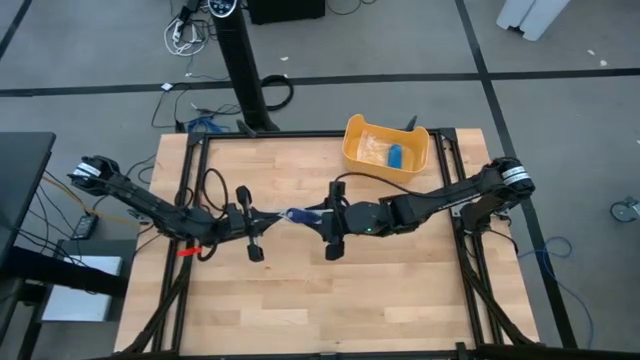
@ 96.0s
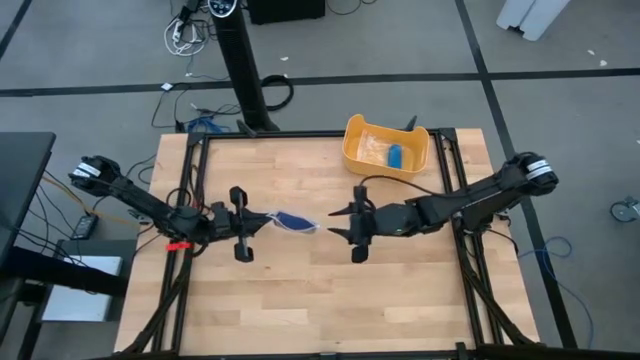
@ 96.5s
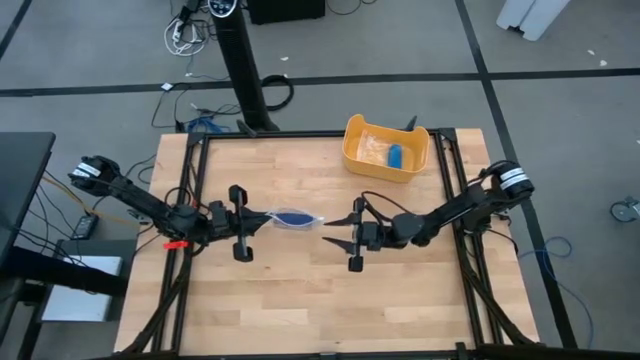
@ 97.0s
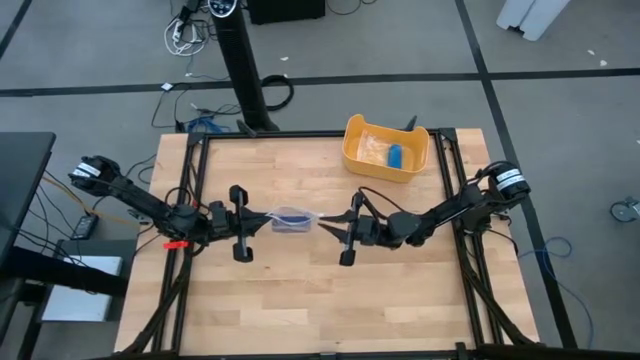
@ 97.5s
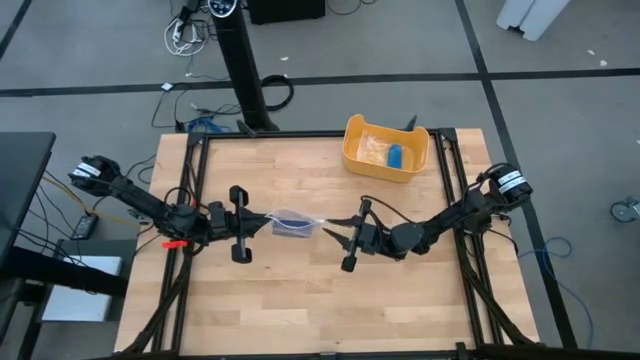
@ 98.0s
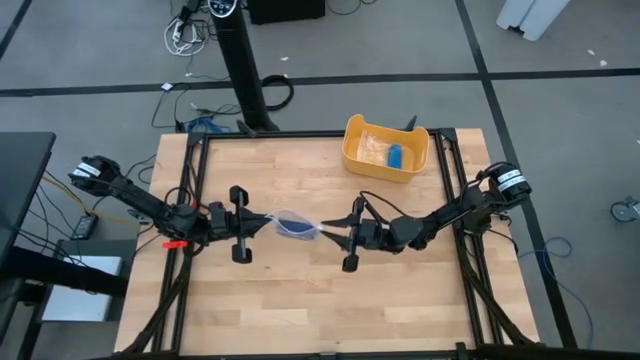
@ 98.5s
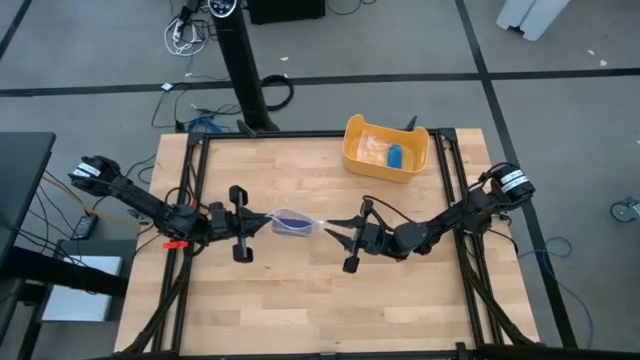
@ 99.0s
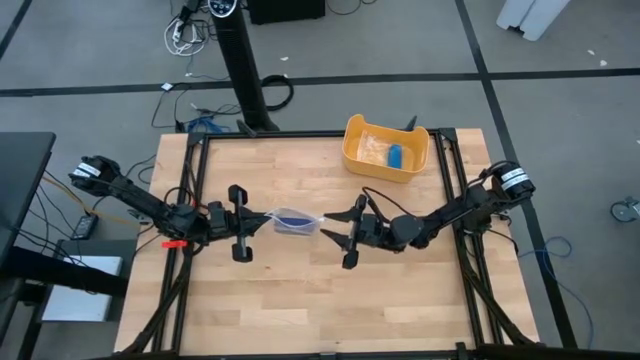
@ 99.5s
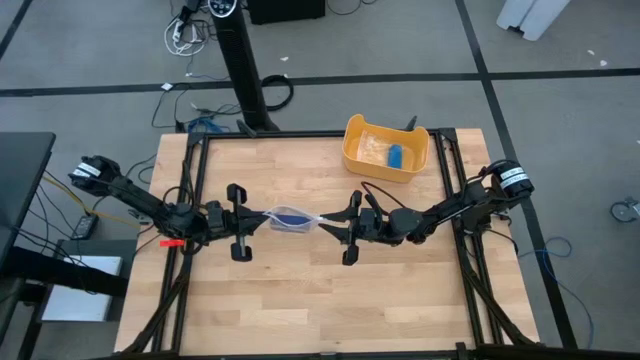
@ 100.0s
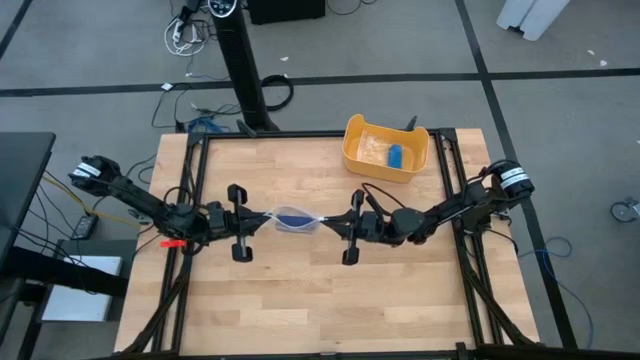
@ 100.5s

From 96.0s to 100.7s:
Task: Roll bandage
Close the transparent zip bag

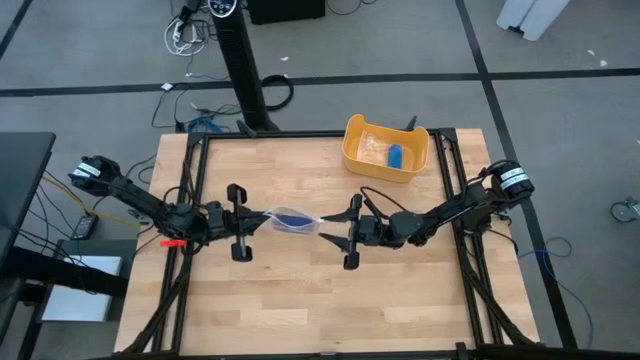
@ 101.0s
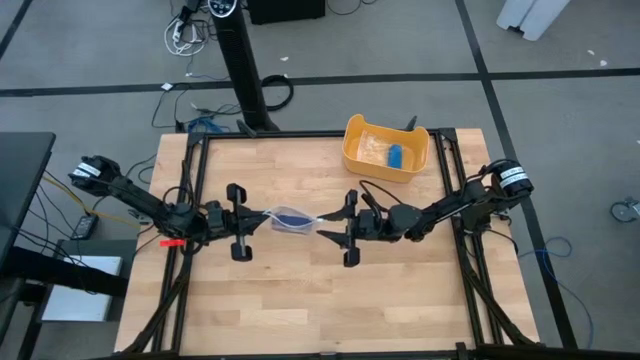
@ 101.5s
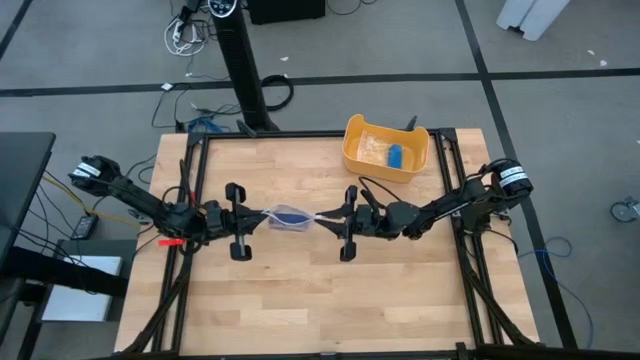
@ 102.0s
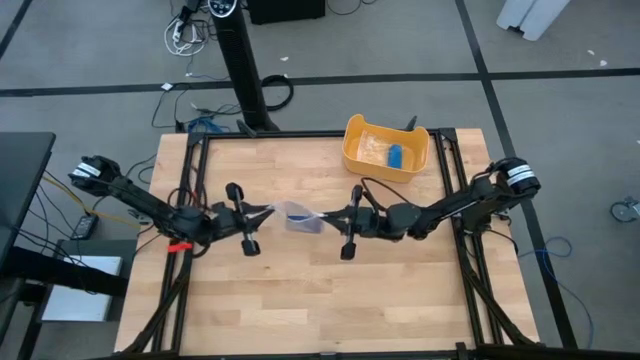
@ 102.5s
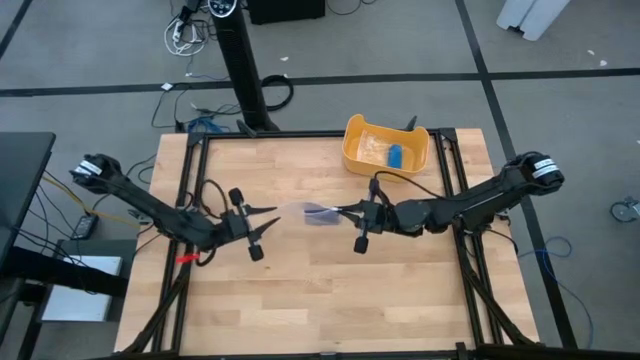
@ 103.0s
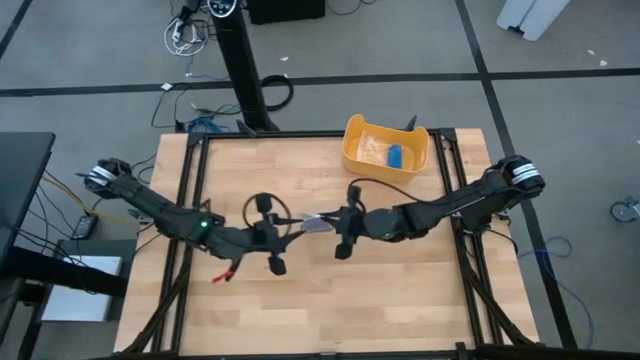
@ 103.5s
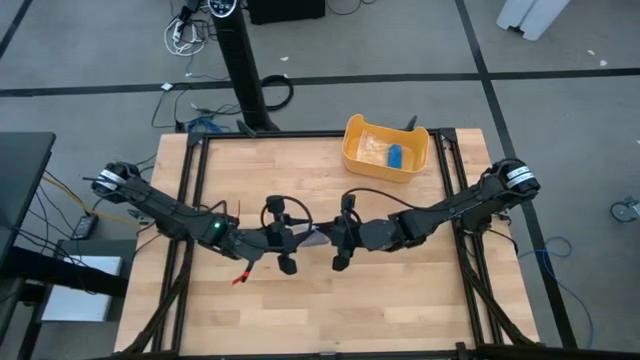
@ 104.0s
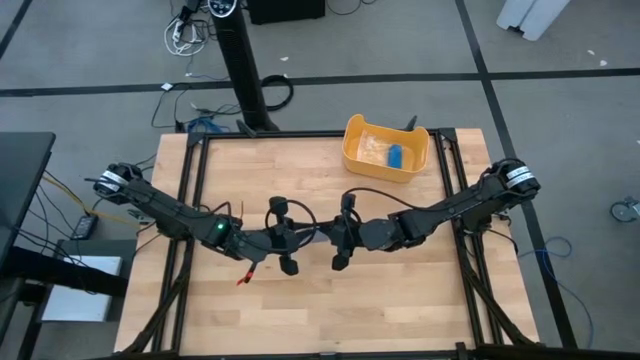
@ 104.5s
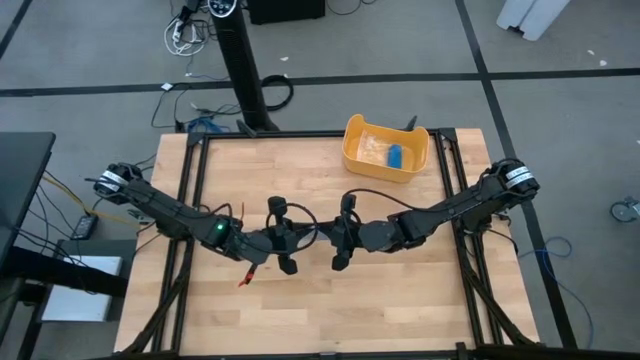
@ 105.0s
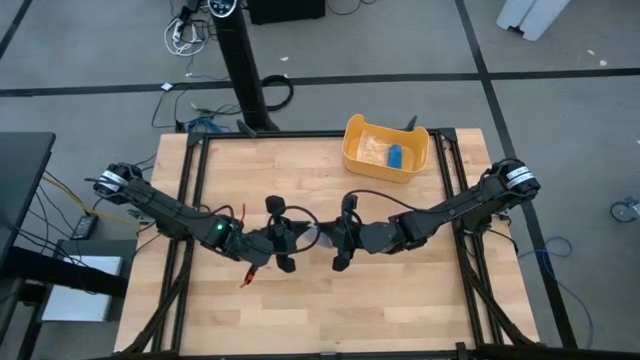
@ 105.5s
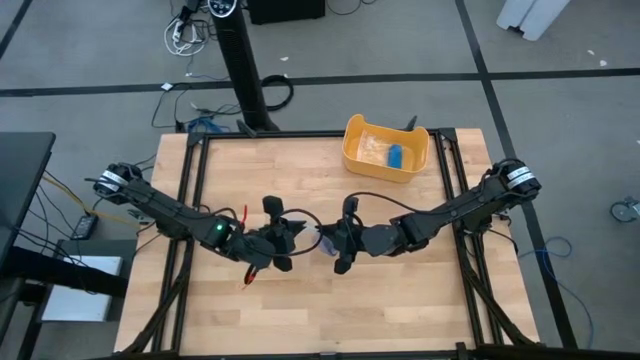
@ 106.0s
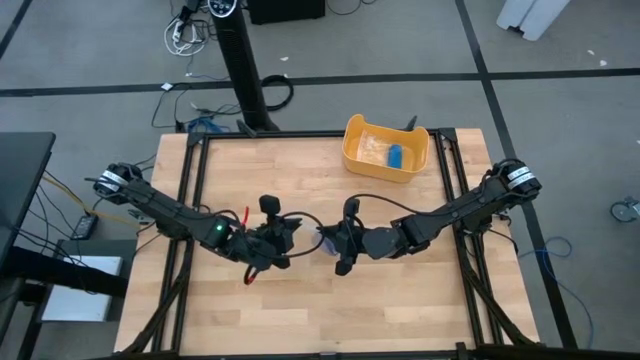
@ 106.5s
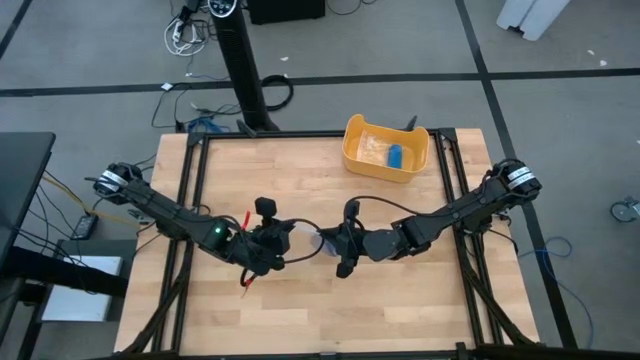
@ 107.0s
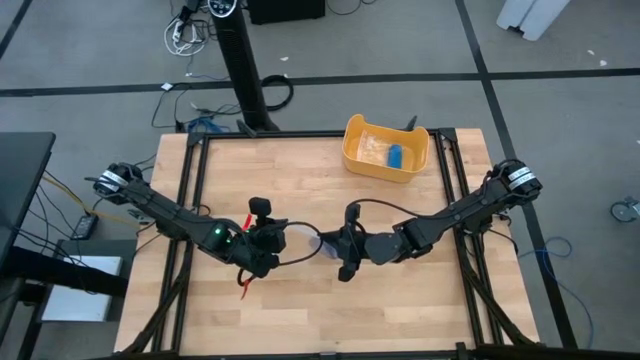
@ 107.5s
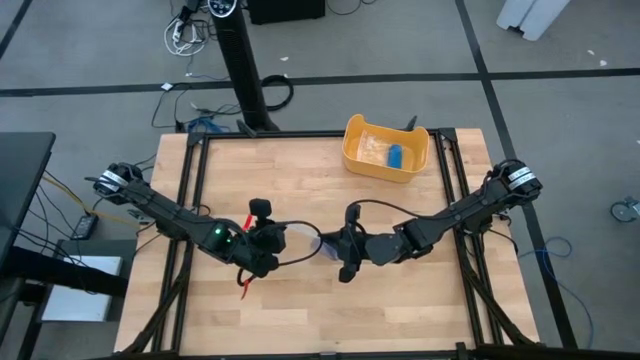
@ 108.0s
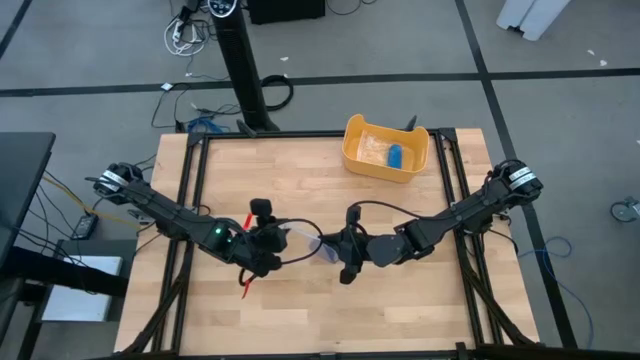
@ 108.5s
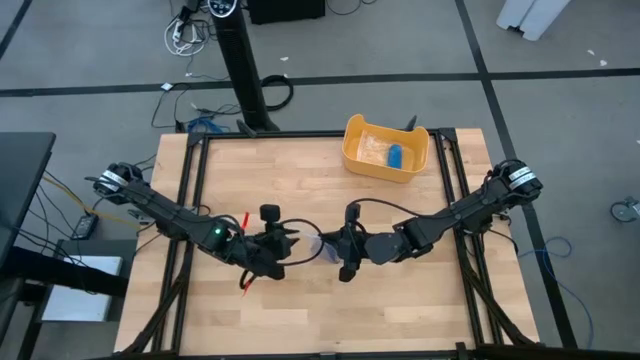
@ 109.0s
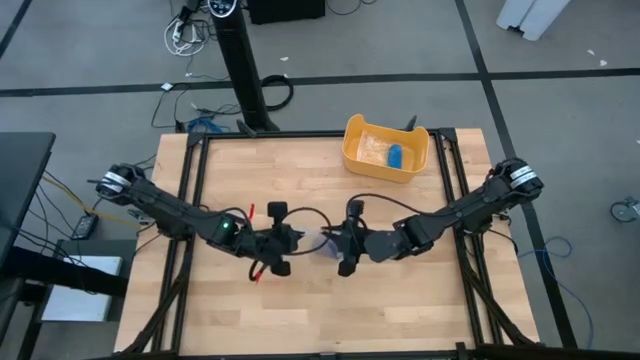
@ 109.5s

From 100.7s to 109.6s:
Close the transparent zip bag

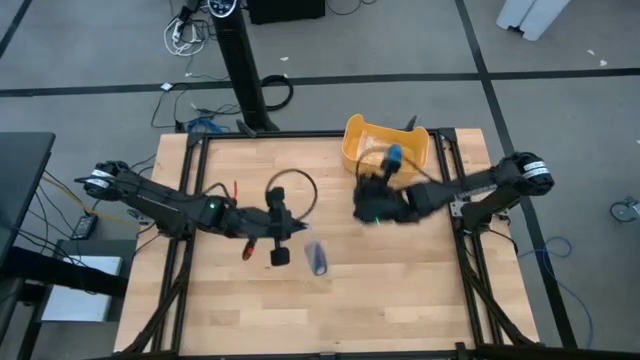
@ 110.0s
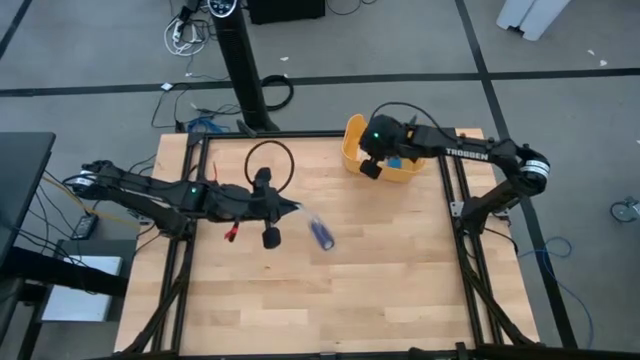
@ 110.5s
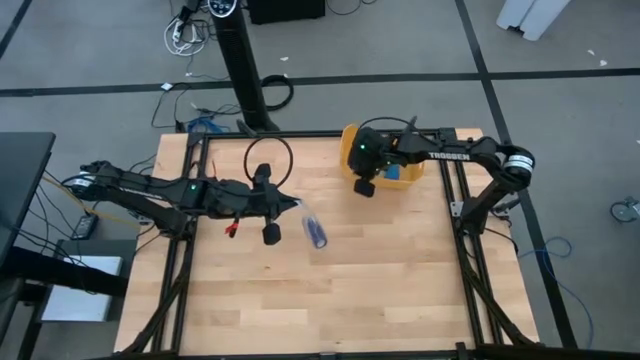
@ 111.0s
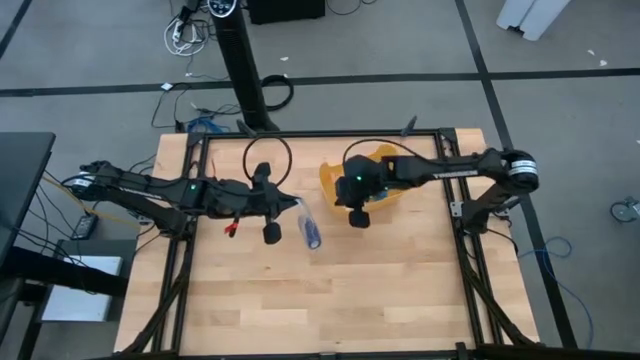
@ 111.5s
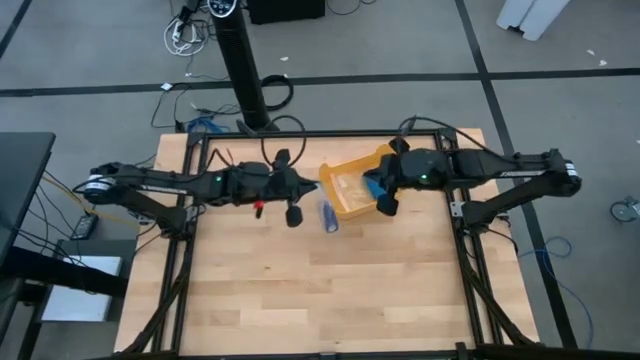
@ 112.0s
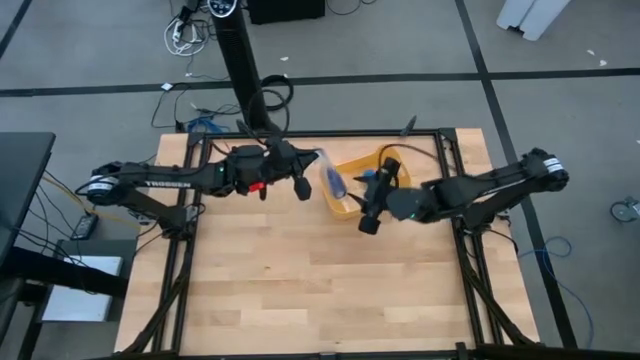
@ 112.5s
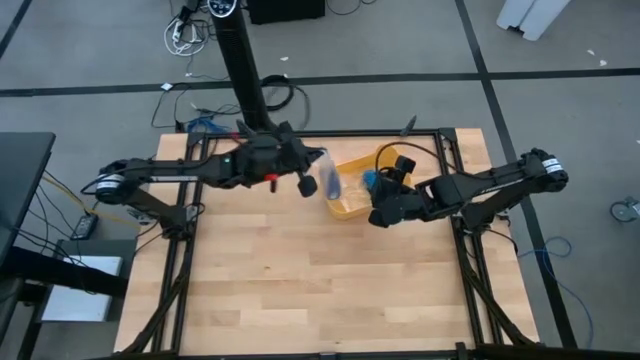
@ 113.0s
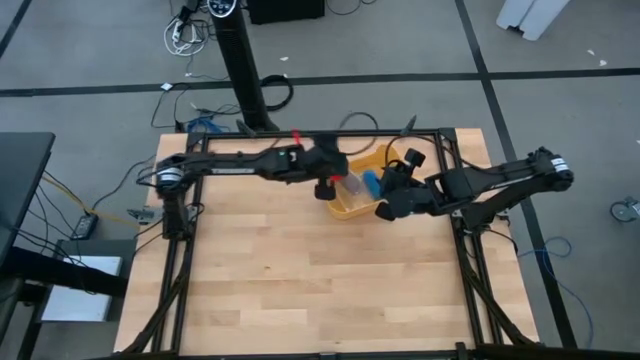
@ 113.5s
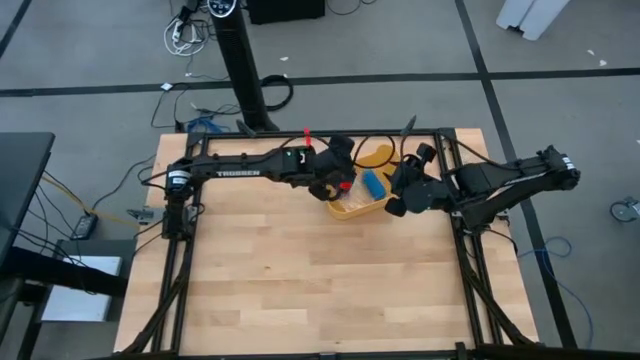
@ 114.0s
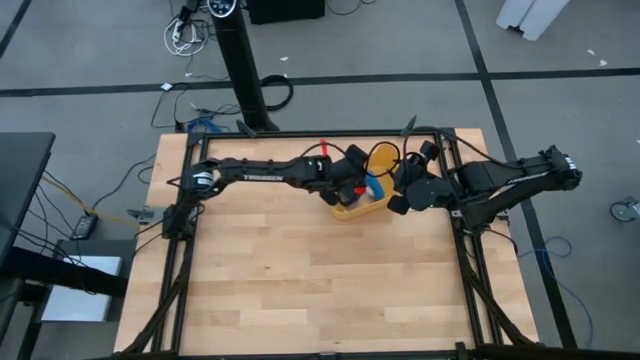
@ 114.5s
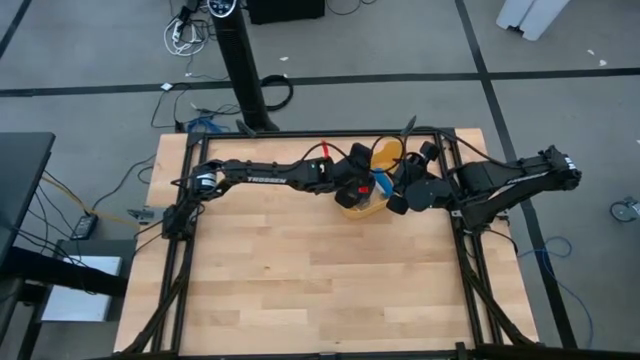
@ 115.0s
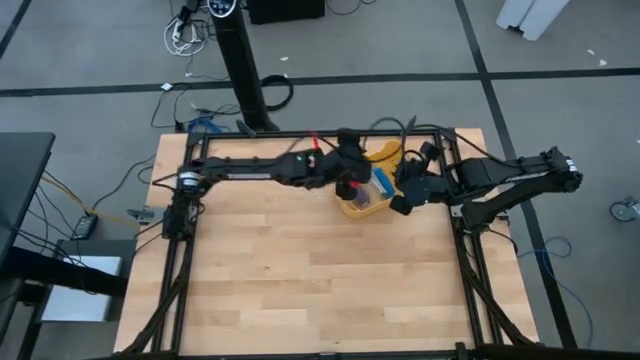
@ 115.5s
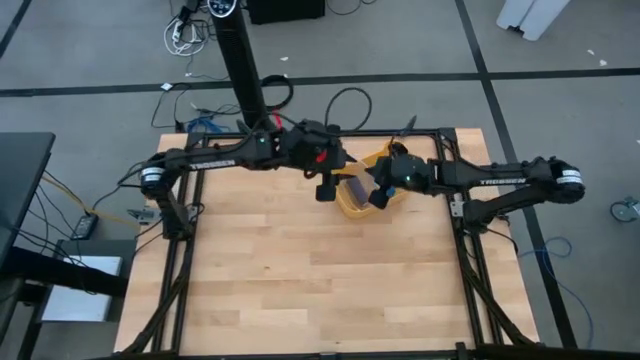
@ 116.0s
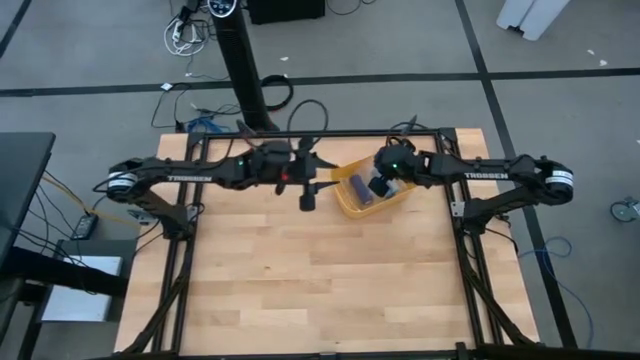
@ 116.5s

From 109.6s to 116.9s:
Put the transparent zip bag into the yellow bin

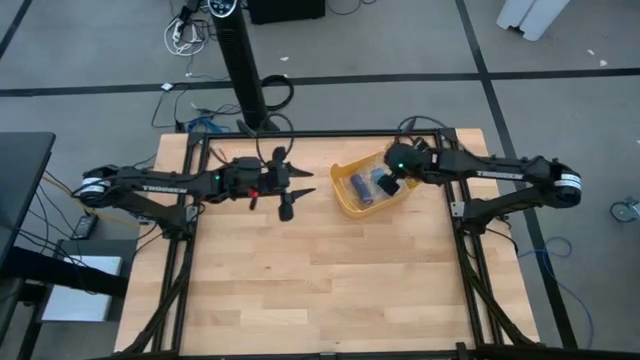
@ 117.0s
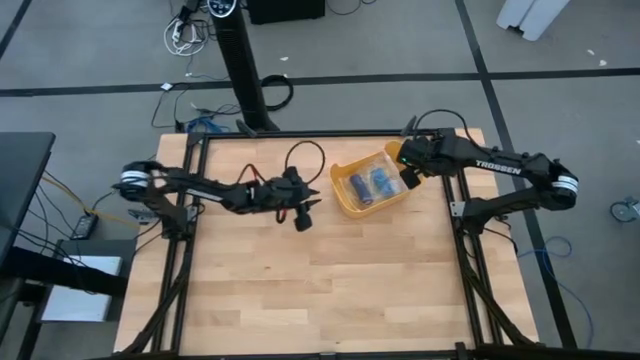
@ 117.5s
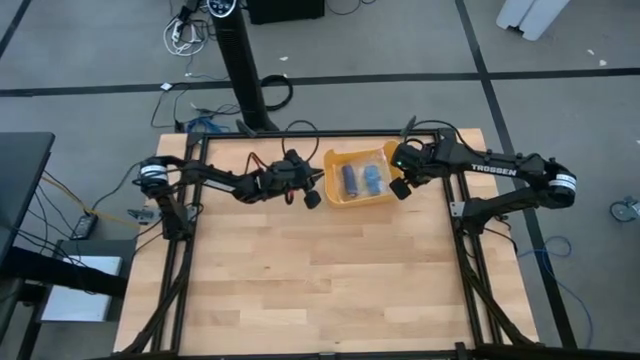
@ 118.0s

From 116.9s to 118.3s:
Adjust the yellow bin
